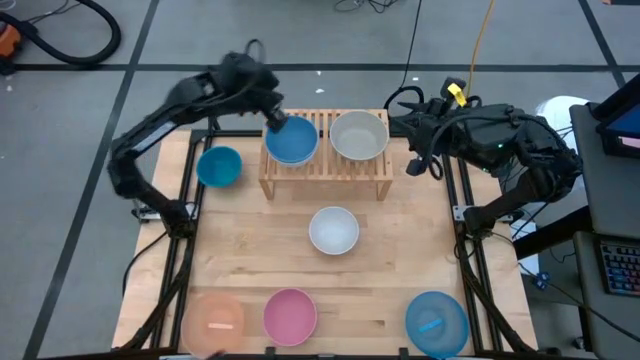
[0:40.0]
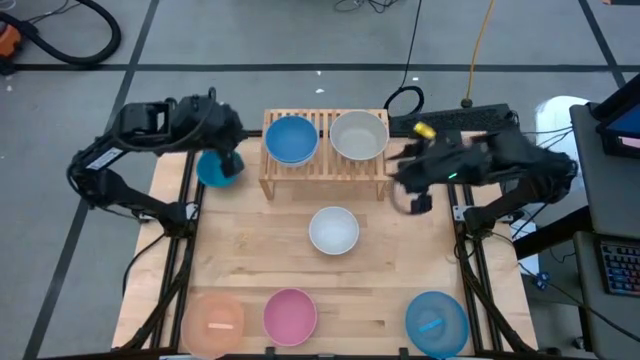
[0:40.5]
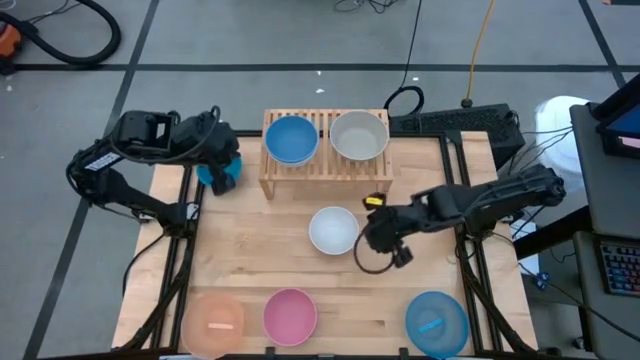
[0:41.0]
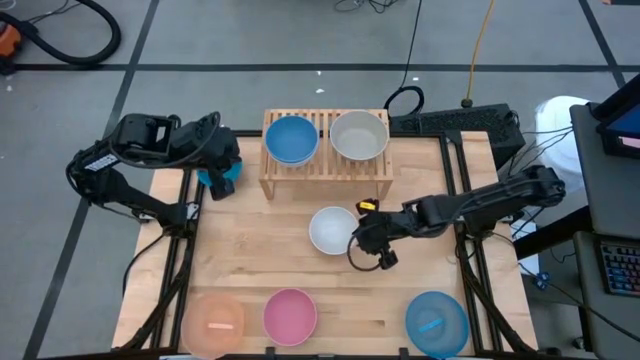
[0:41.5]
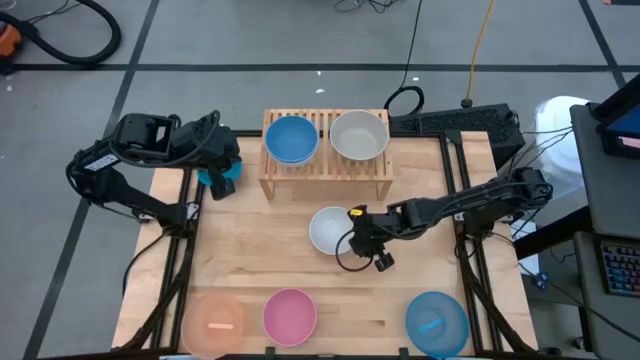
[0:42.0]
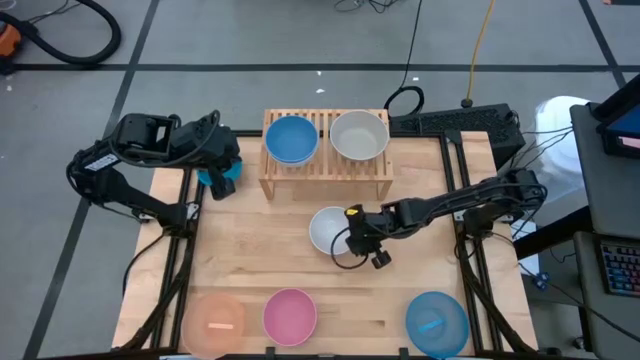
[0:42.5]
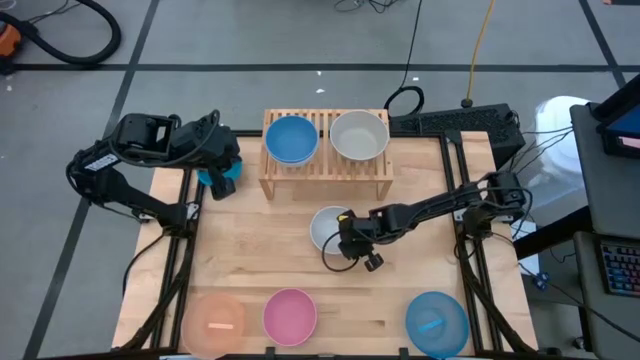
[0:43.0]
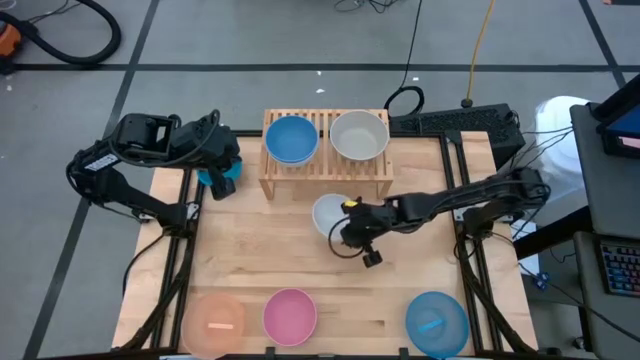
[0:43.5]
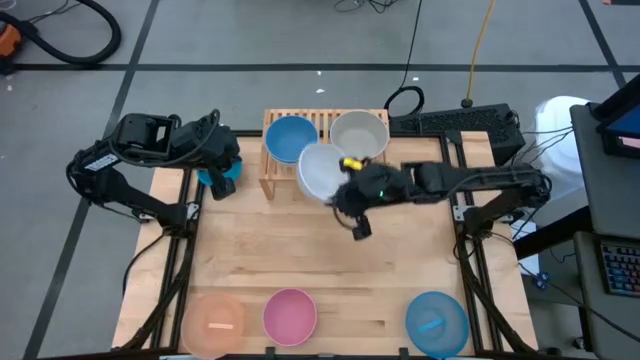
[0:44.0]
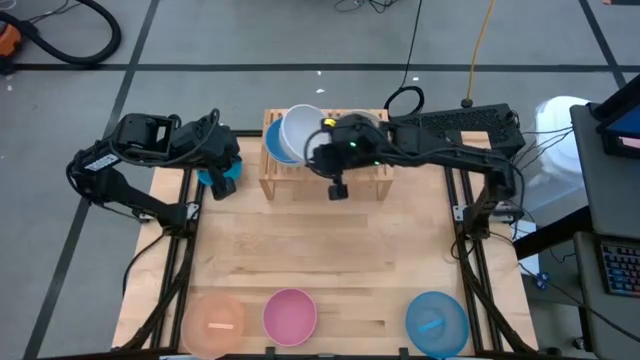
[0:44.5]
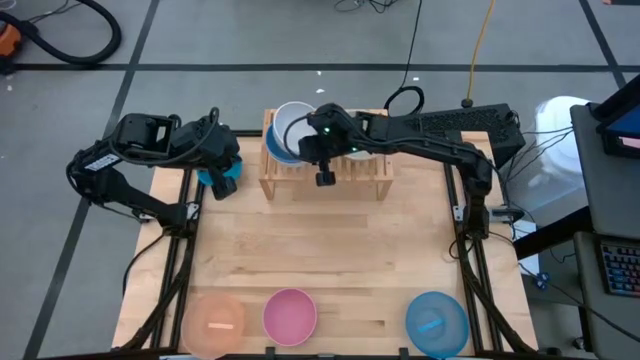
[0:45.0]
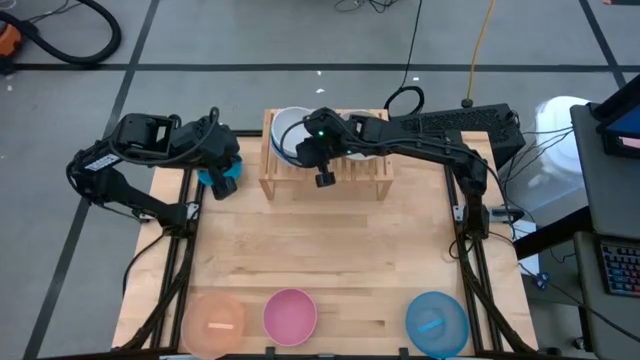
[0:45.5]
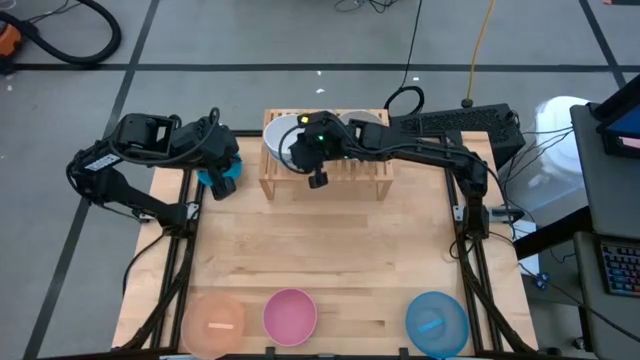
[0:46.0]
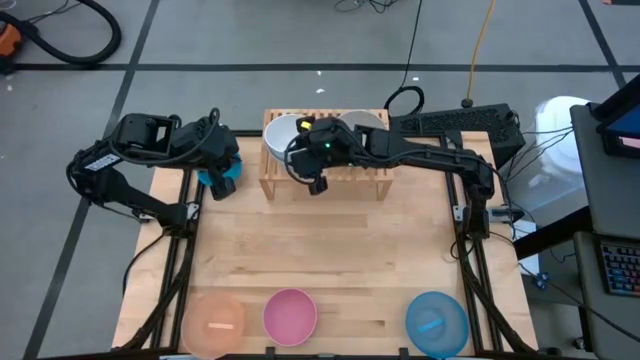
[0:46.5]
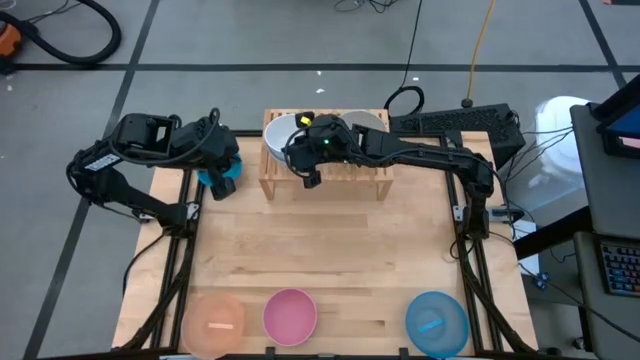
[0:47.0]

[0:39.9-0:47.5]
Task: Place and stack bowls onto a shelf
Stack the small white bowl on top of the small blue bowl on the shelf

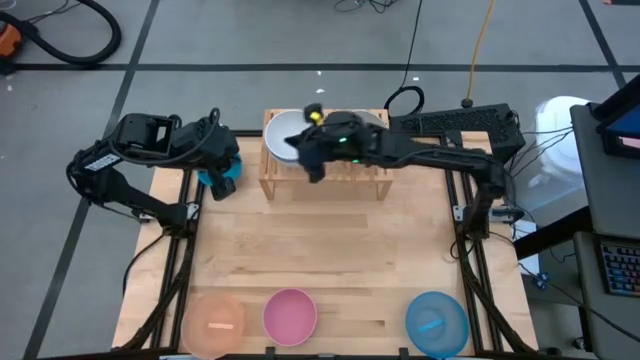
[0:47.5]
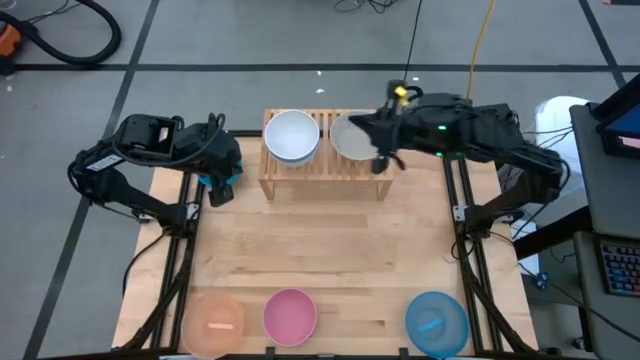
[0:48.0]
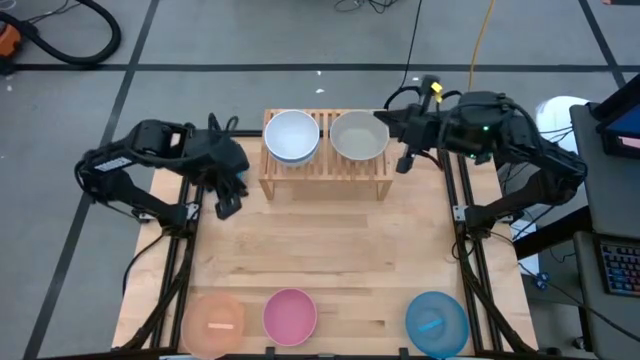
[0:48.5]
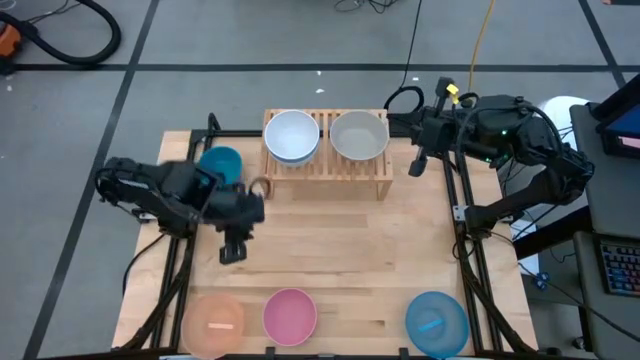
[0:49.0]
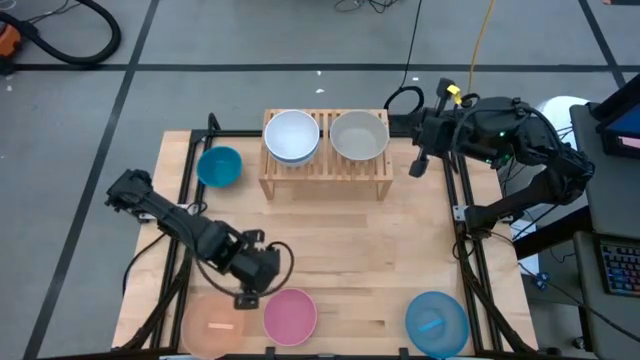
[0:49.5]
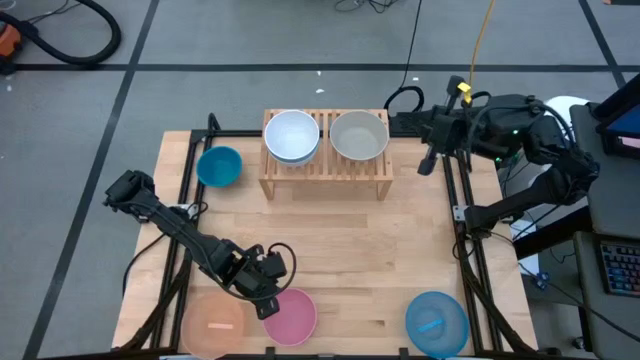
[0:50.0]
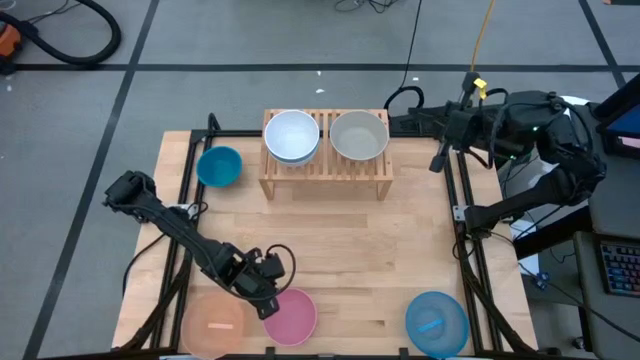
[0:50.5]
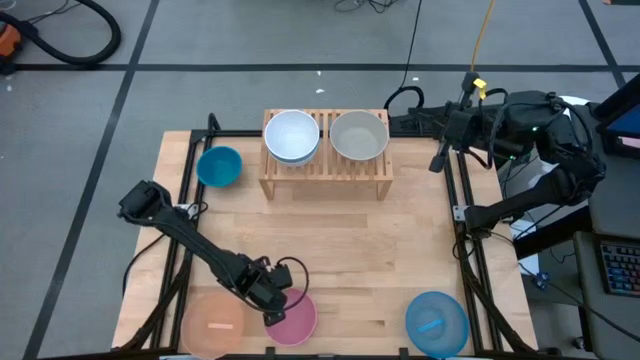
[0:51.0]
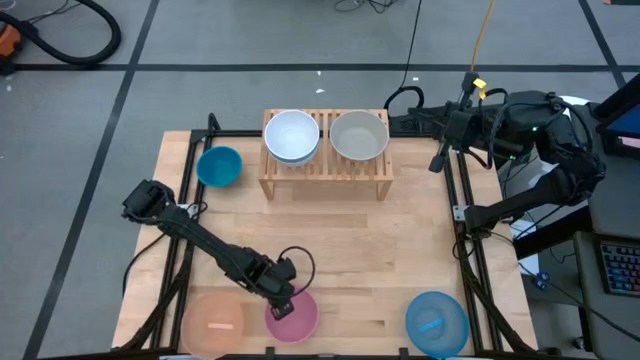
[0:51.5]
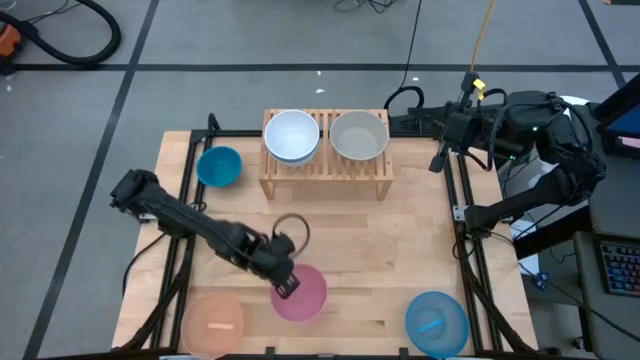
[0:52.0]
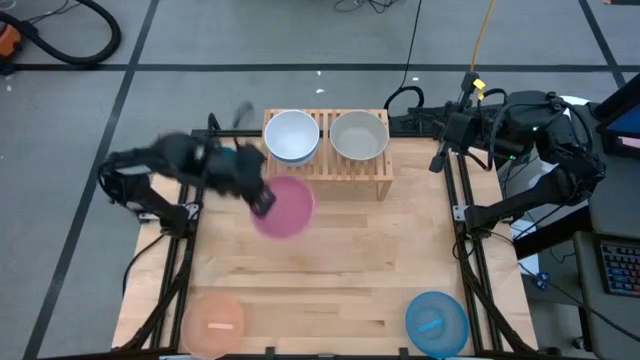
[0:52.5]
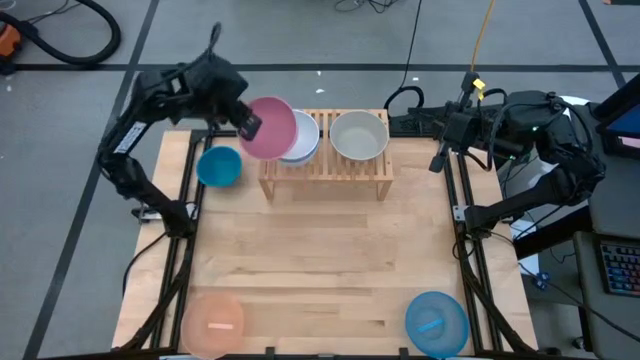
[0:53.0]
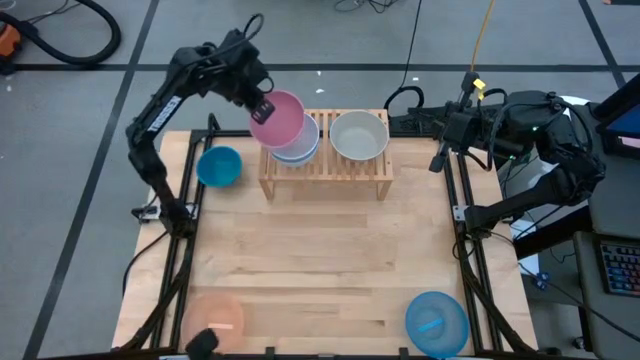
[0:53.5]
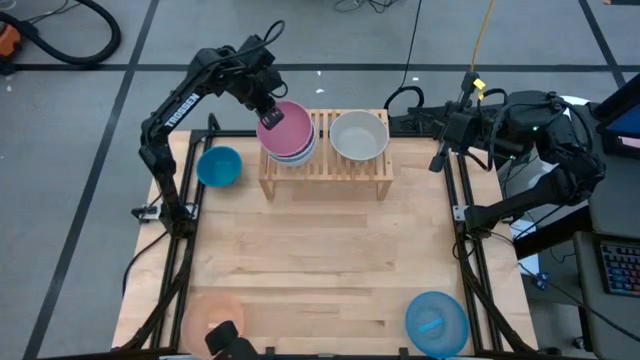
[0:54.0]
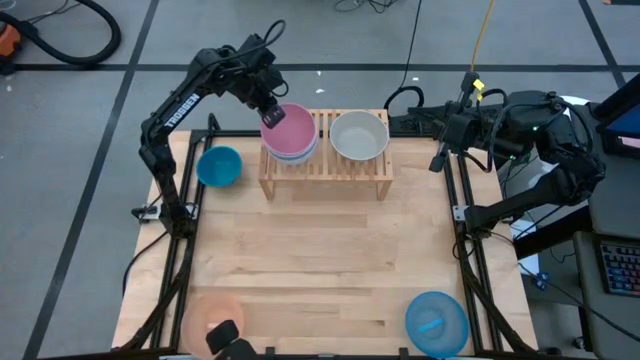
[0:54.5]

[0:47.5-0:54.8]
Stack the small pink bowl on top of the small white bowl on the shelf

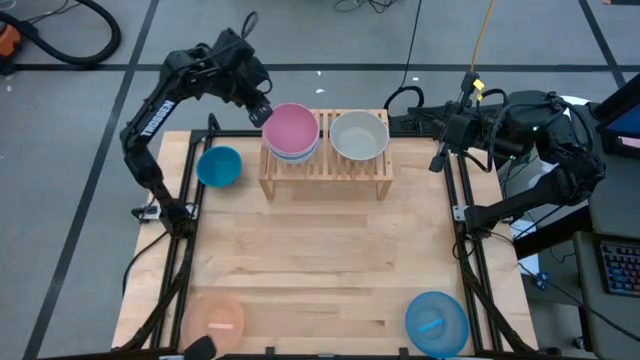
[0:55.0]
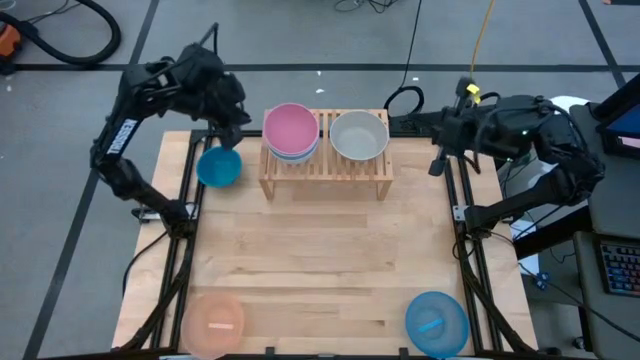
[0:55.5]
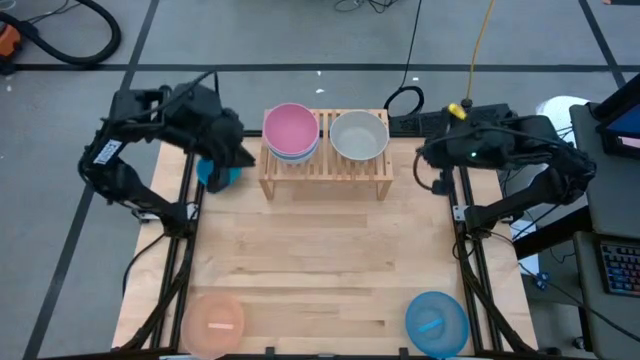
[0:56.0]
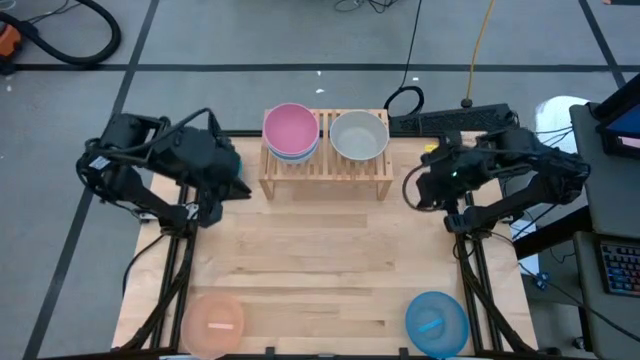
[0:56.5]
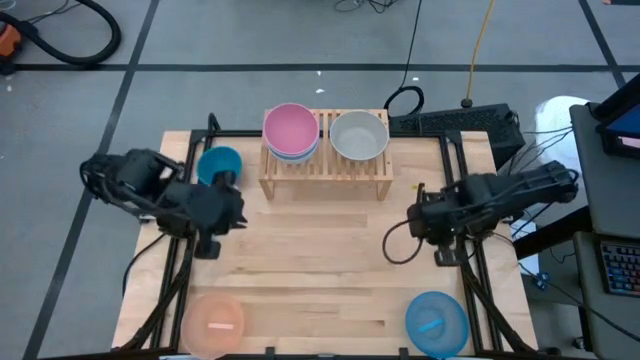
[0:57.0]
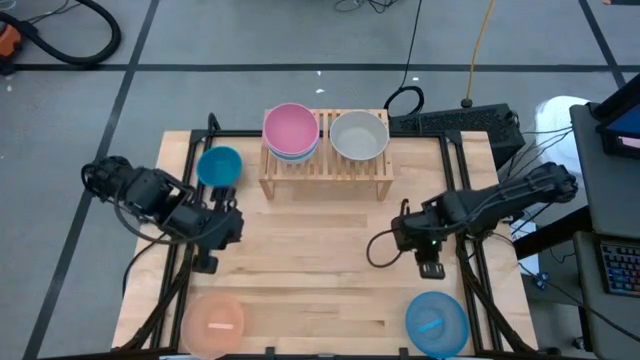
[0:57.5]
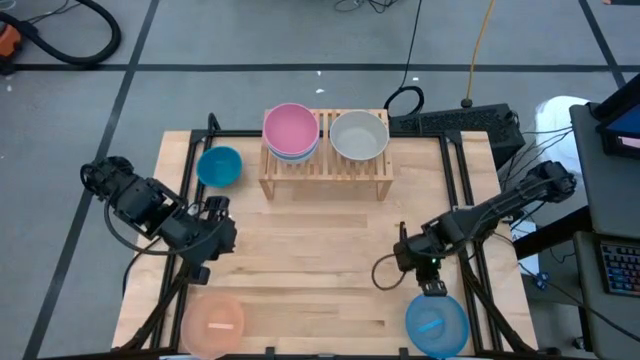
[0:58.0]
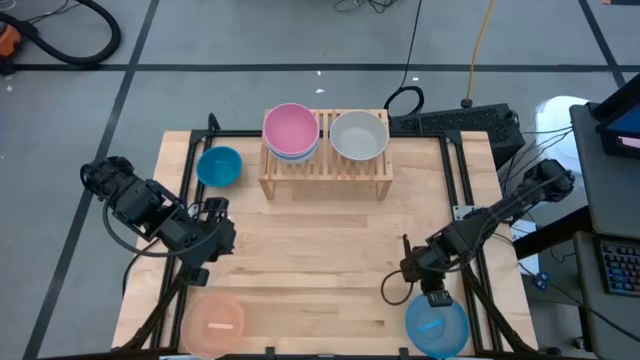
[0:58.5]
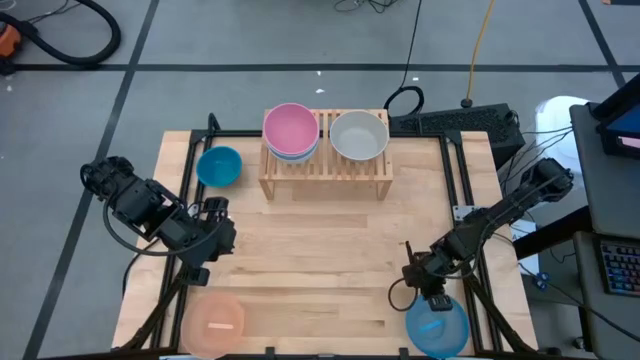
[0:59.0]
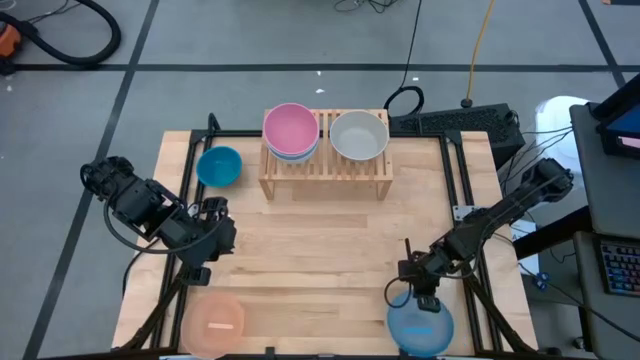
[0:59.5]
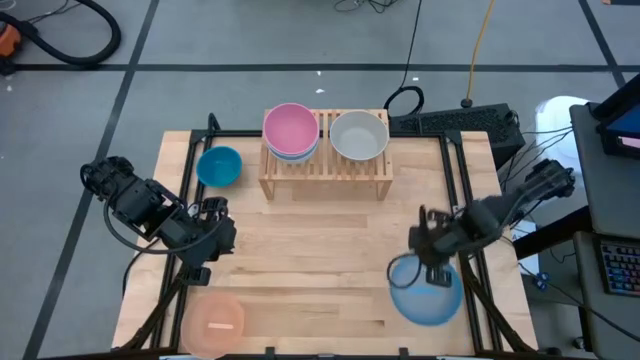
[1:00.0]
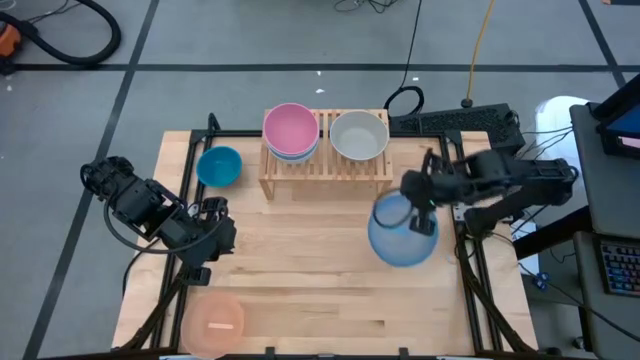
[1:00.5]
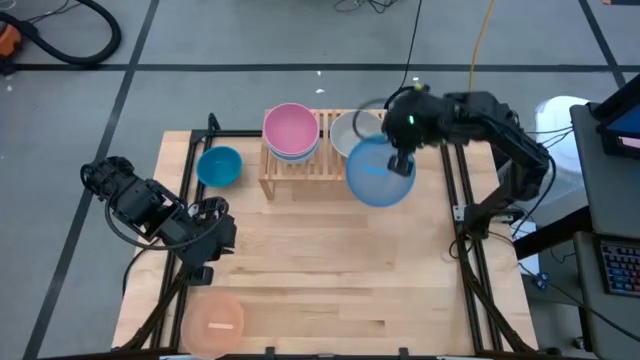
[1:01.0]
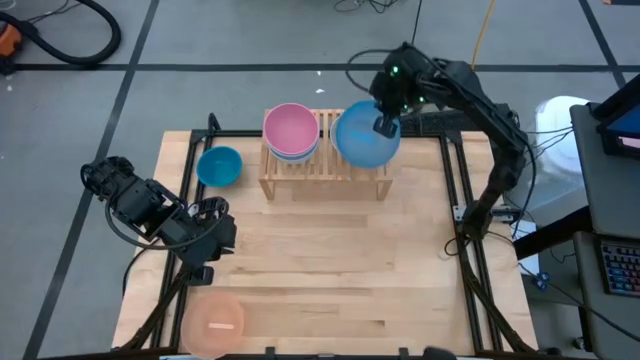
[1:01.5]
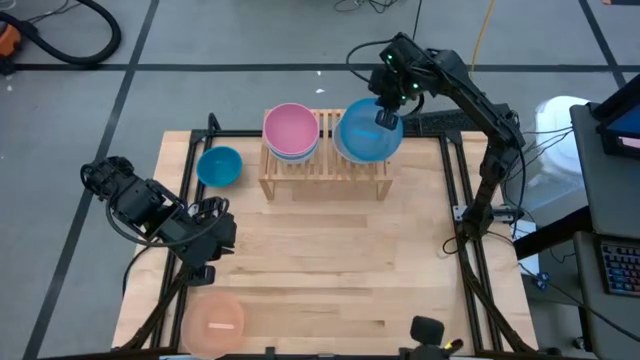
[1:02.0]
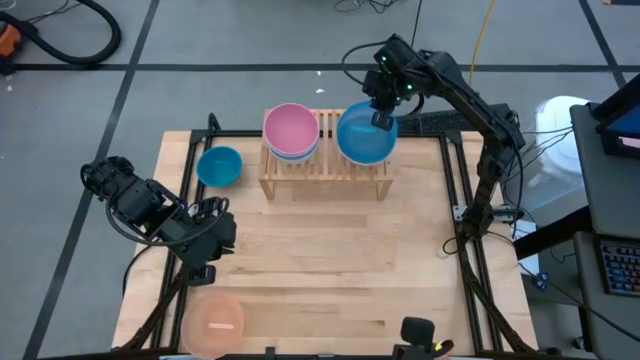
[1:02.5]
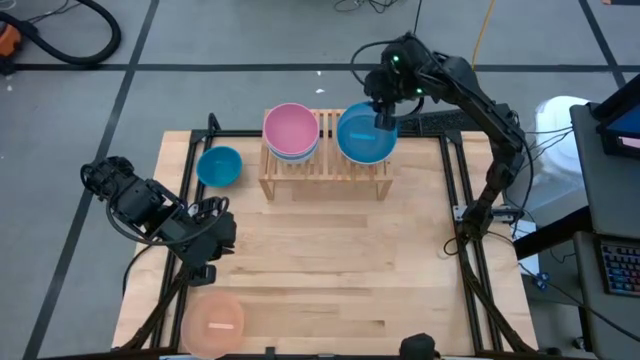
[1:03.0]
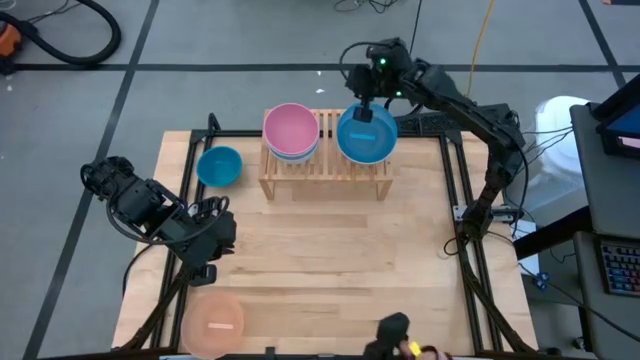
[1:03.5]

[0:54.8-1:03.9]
Stack the large blue bowl on top of the large gray bowl on the shelf
